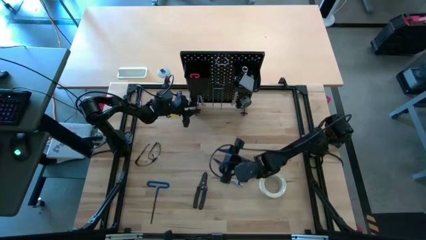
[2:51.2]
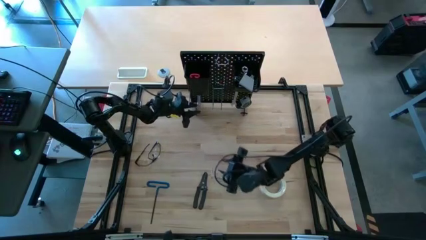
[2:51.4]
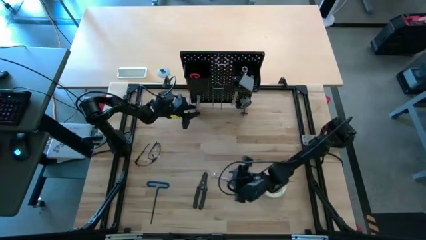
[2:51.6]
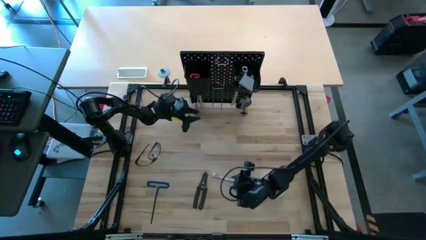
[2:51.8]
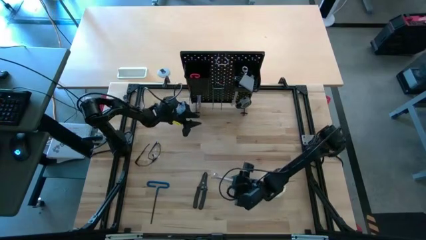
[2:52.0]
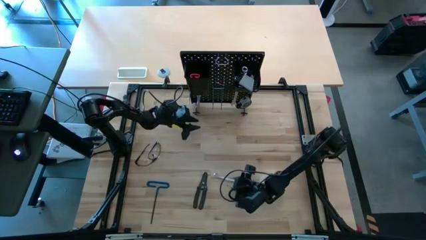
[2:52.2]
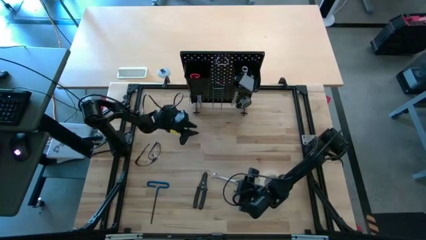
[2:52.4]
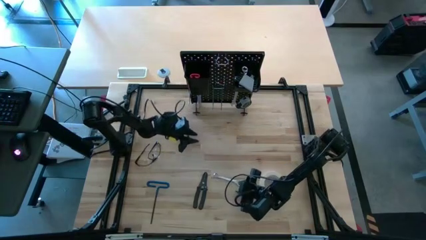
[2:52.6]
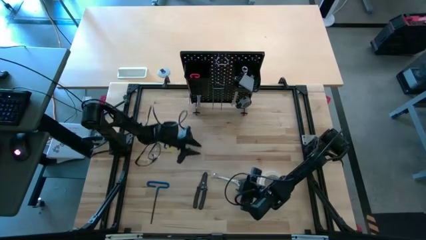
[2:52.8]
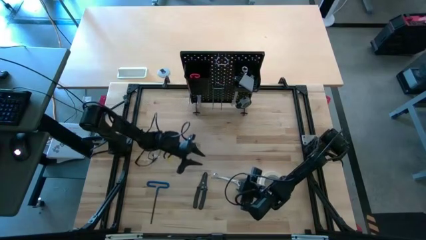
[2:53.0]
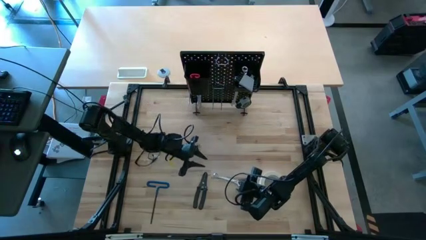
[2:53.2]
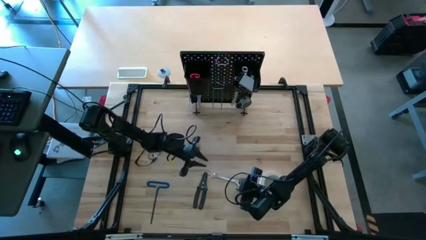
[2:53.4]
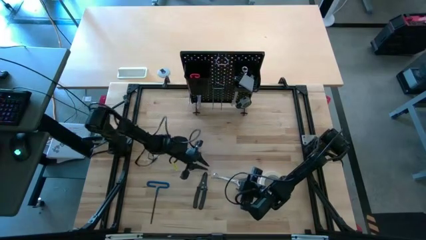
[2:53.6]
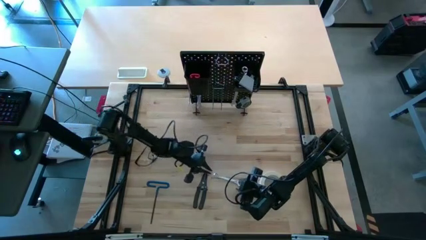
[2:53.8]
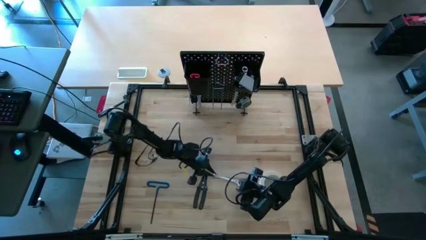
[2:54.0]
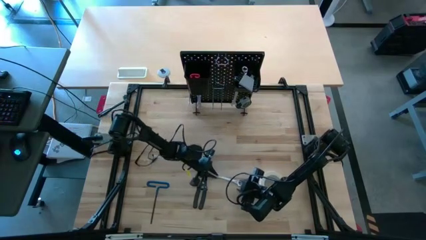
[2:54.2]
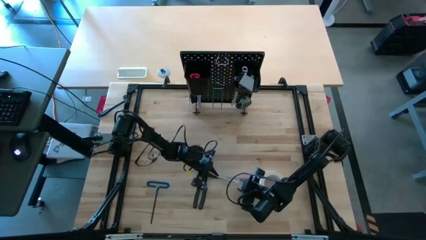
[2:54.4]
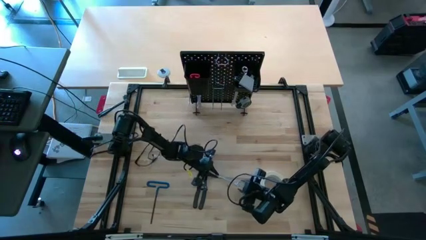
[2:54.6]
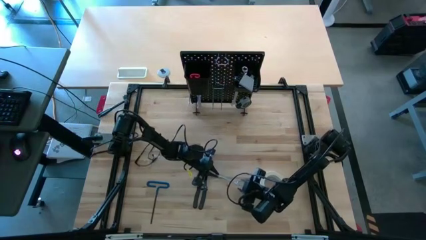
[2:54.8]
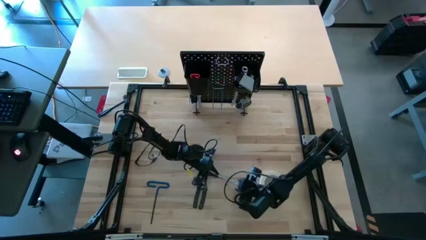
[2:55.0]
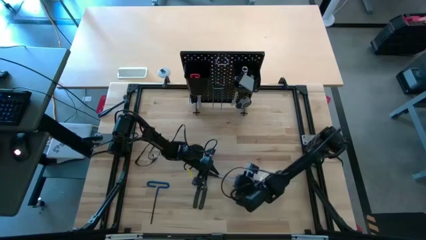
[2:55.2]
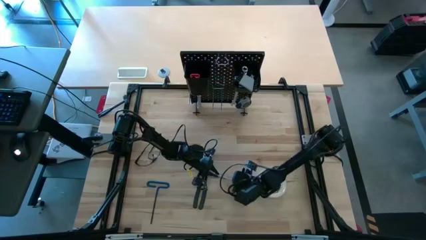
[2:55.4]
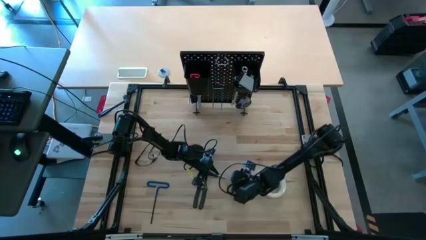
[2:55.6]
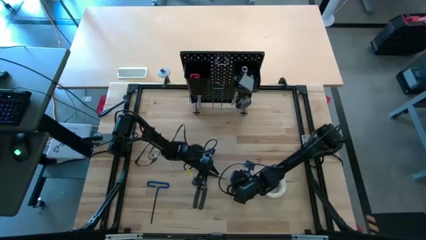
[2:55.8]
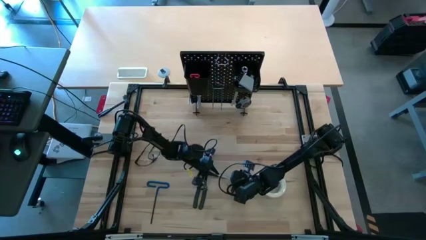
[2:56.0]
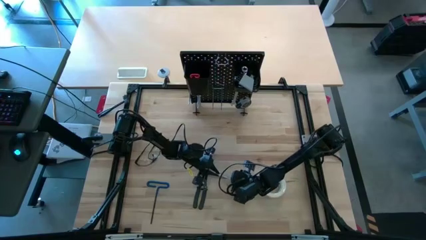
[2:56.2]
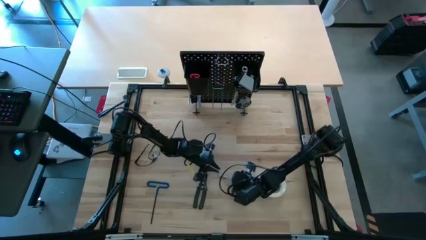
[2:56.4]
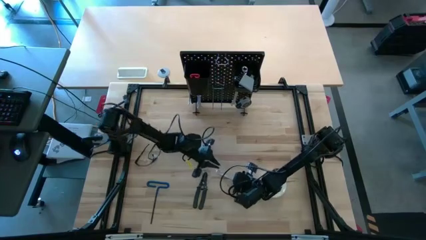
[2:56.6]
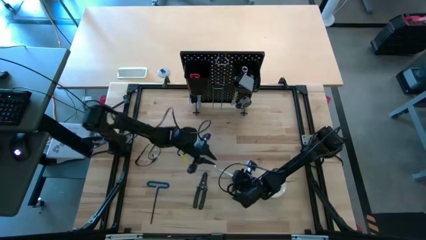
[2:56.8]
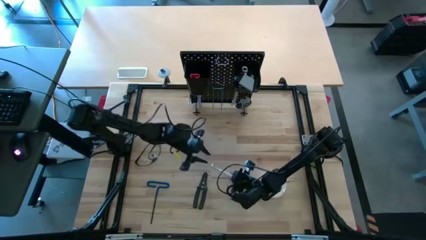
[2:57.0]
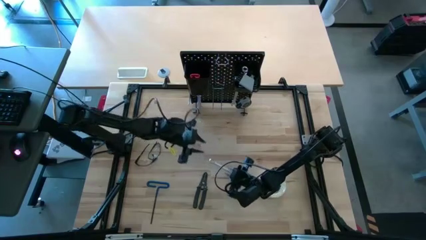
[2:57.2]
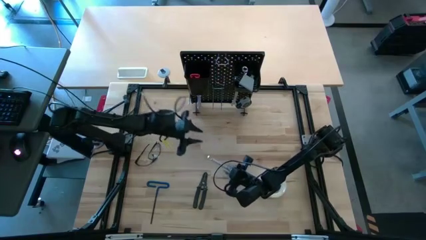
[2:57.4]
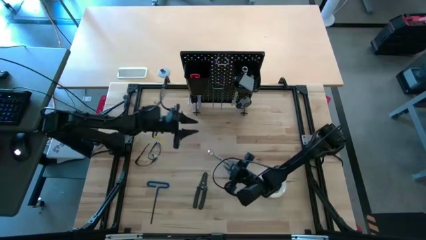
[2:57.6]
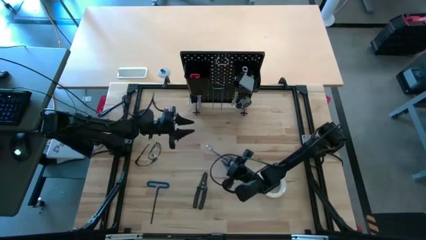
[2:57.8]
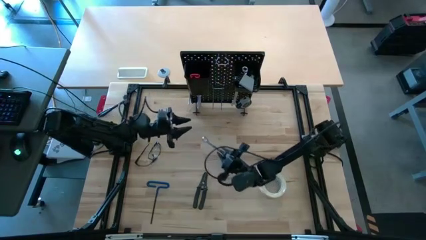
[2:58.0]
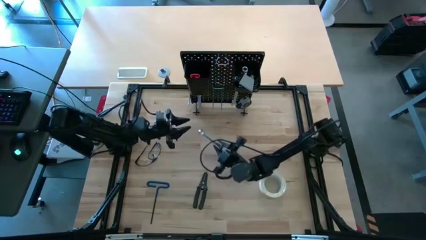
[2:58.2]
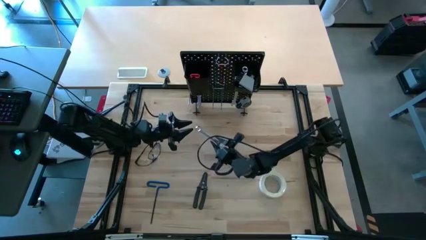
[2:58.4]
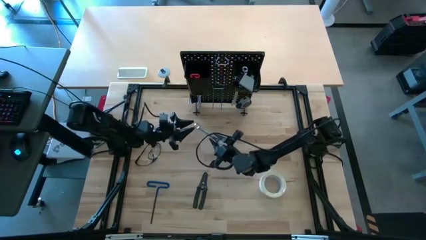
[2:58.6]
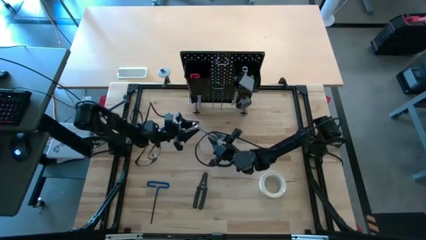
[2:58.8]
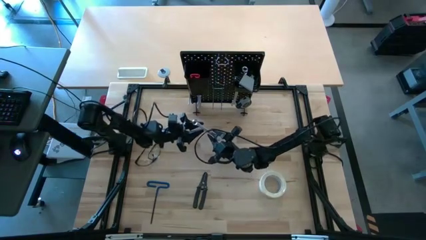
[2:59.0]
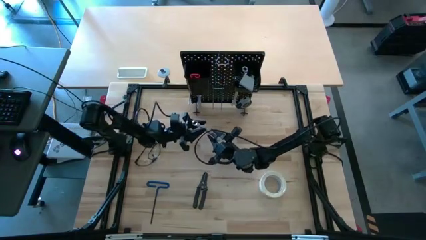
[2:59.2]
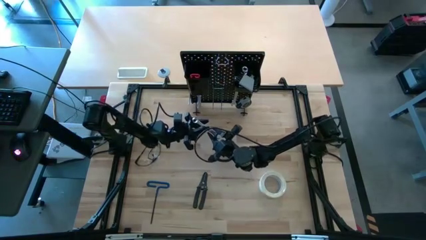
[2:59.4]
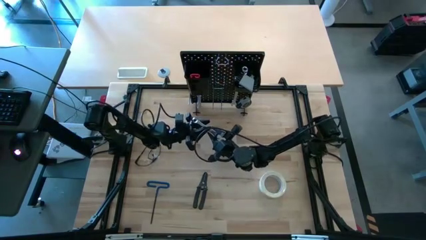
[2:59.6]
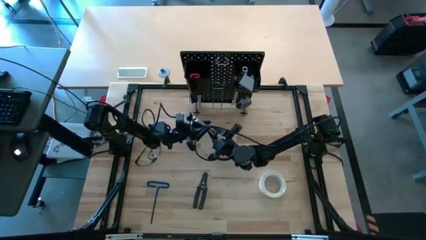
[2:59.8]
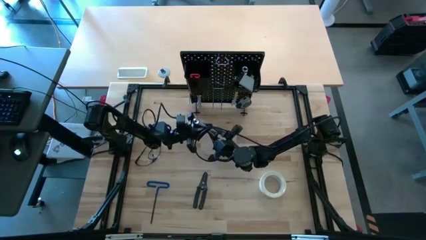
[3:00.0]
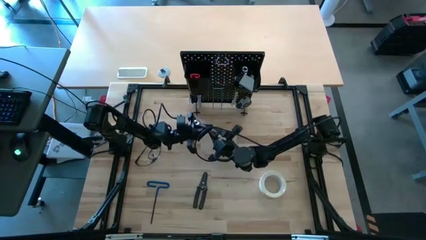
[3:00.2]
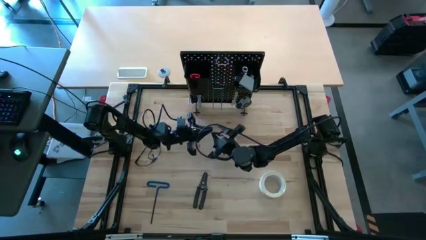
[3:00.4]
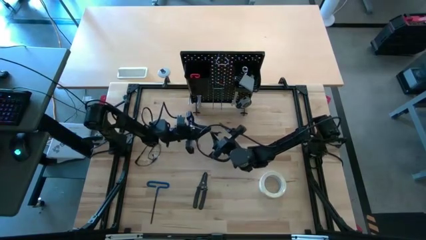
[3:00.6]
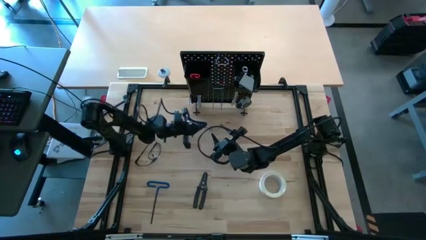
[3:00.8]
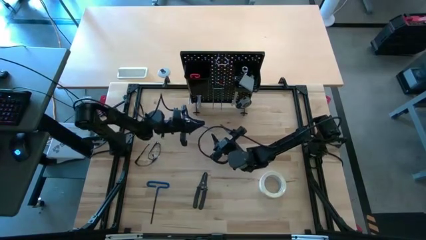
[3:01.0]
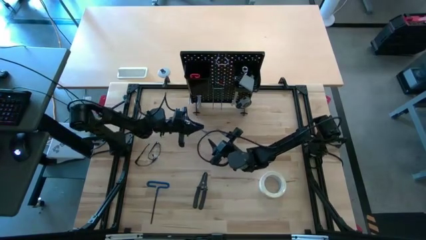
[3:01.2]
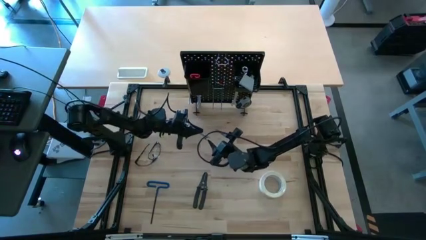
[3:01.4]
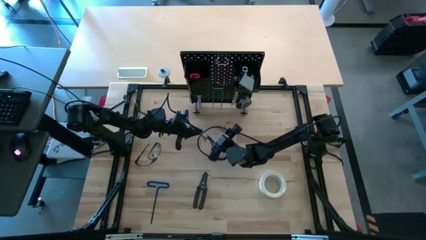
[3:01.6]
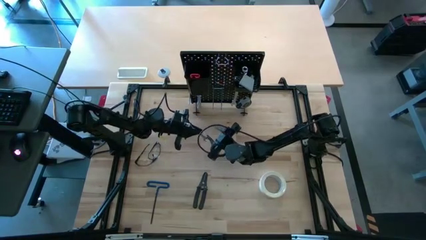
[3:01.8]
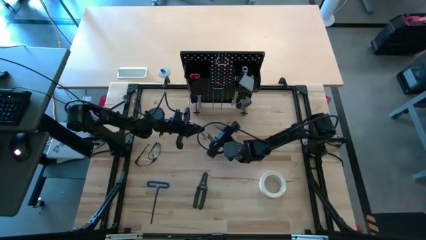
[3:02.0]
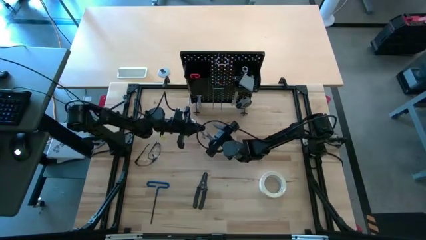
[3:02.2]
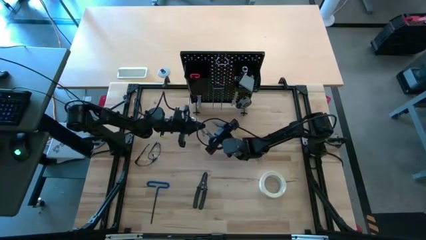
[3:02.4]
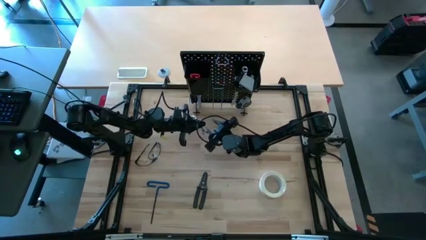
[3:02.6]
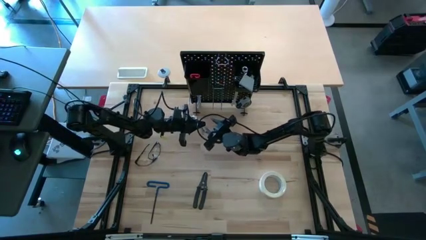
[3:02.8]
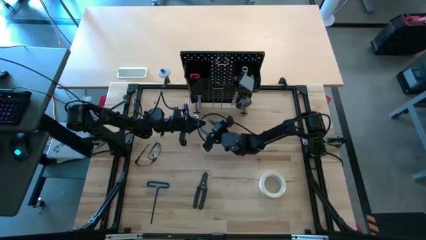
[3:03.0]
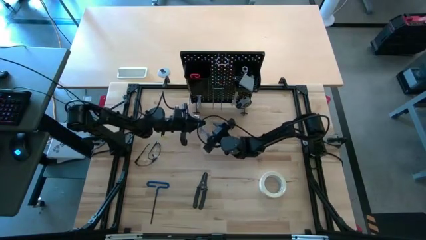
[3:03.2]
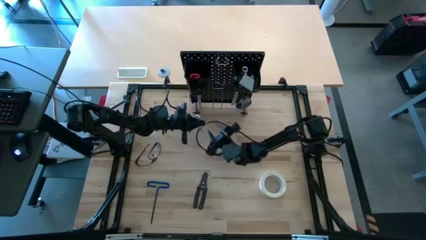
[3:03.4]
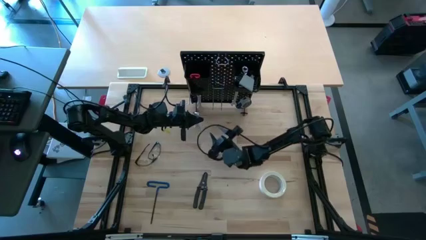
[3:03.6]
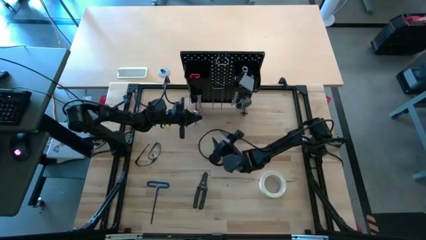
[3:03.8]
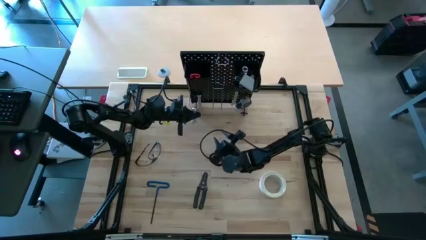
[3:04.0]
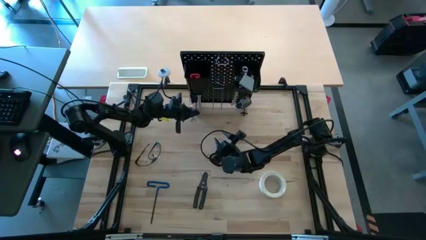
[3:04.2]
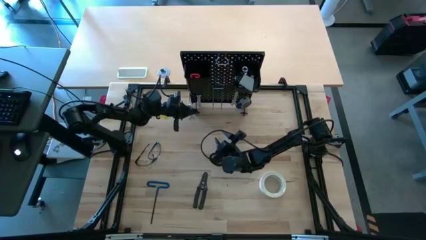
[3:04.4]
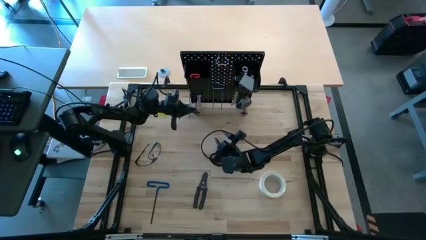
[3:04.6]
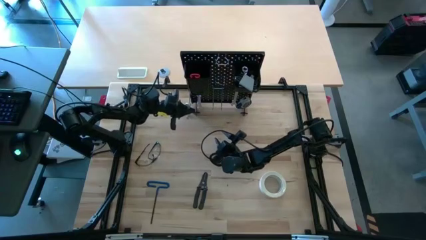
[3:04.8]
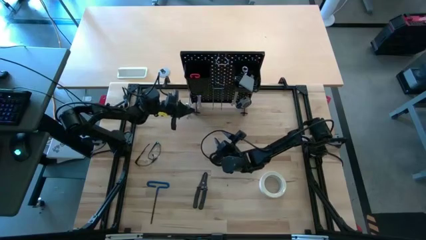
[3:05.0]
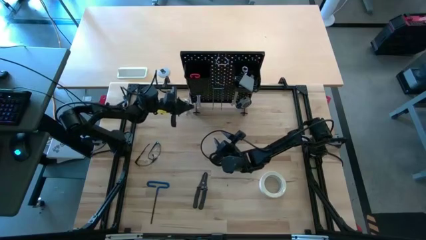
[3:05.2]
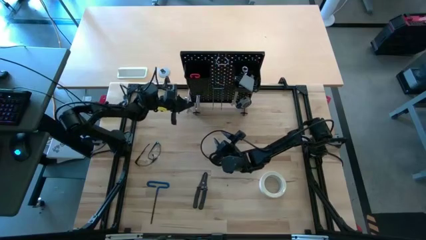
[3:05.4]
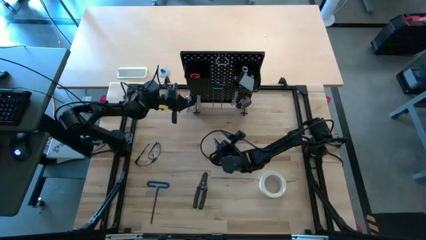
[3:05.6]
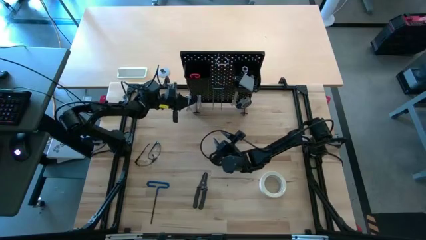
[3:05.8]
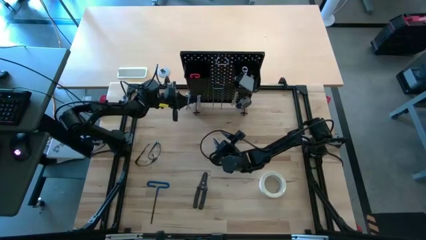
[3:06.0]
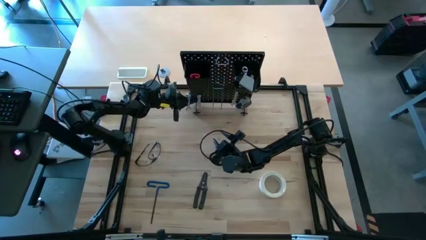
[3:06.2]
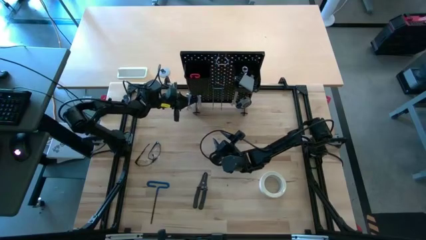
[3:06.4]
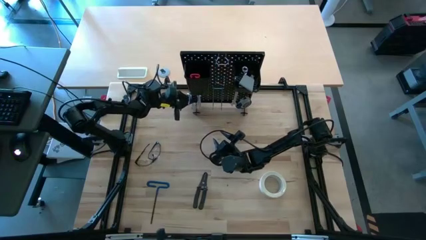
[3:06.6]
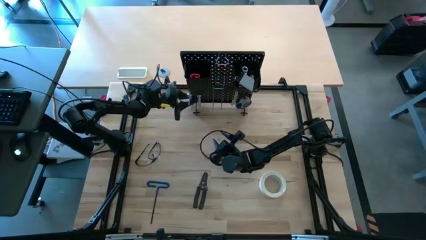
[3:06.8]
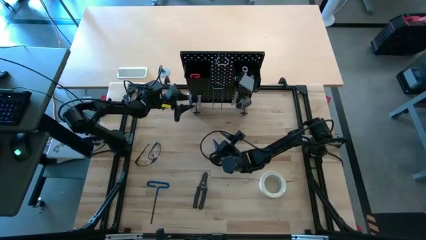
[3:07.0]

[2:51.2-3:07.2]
Task: Hang tools onto peg board
Hang the silver wrench on the pegboard

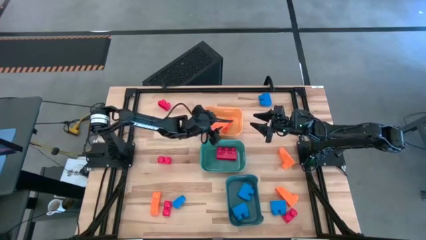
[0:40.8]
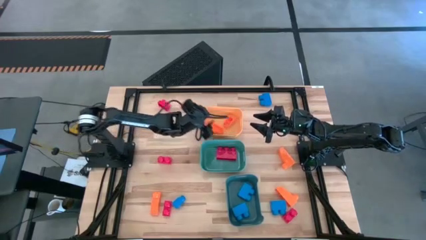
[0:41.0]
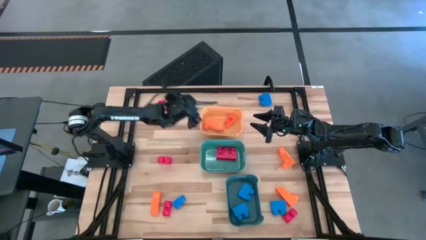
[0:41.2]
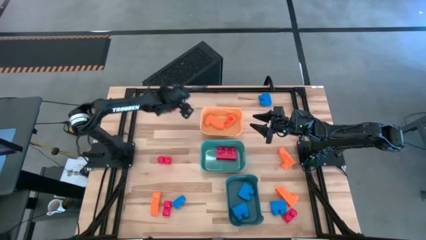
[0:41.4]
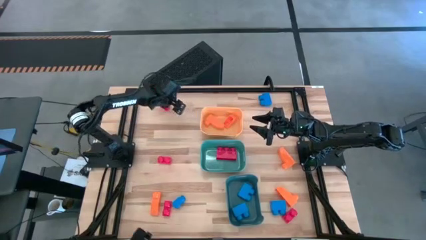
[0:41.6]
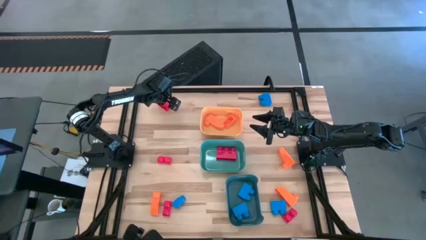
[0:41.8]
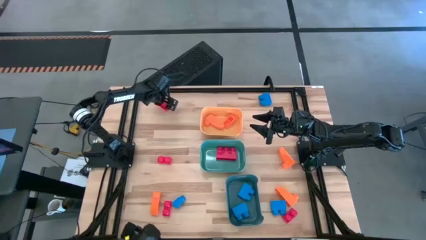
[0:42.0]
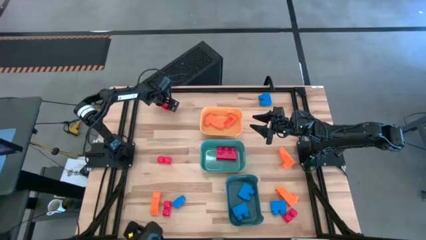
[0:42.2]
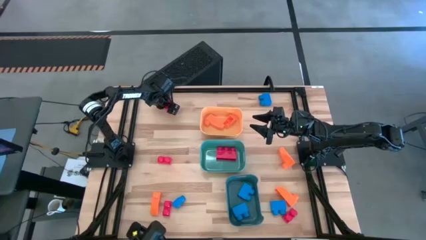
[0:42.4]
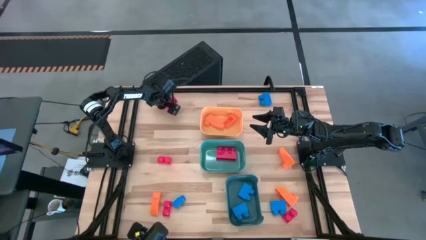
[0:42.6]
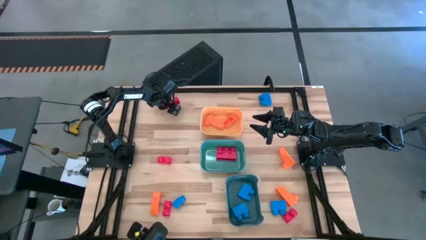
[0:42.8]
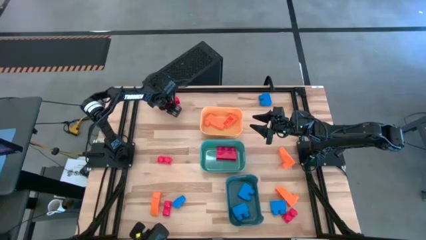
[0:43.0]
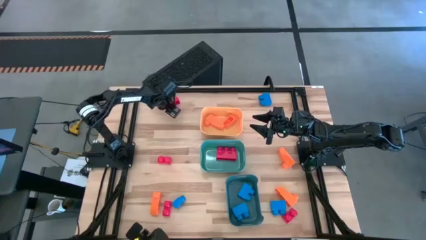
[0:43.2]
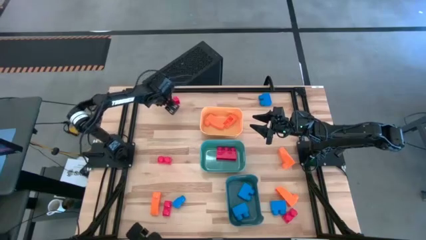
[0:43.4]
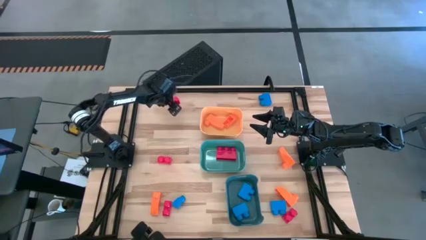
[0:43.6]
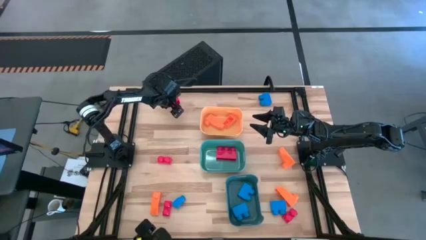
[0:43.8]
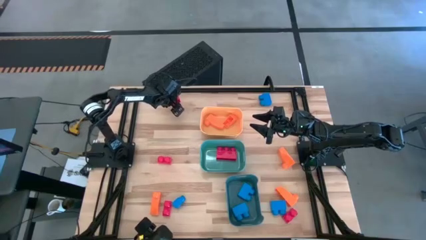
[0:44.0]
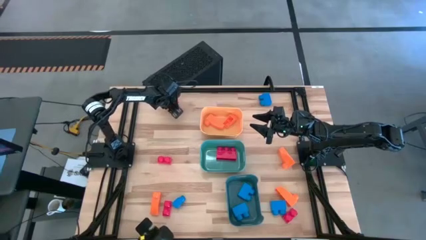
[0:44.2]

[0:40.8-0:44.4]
Task: Sort & place blocks by color
Put the red game piece into the green bin
